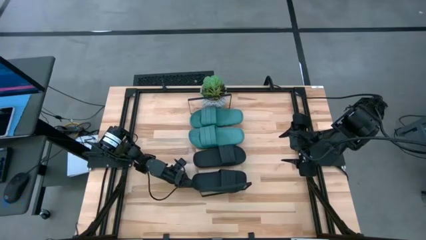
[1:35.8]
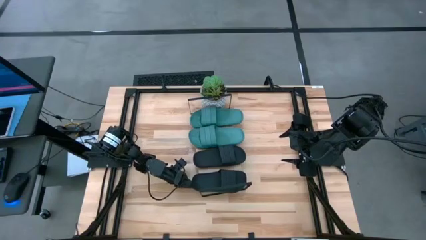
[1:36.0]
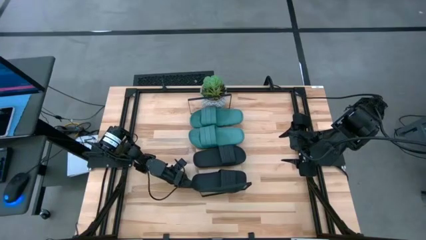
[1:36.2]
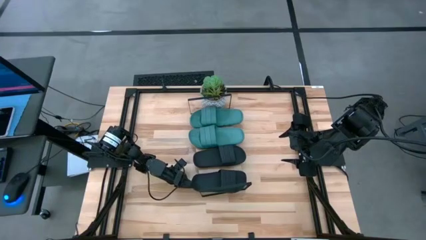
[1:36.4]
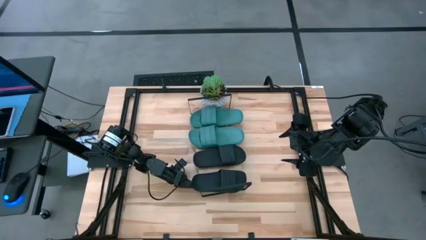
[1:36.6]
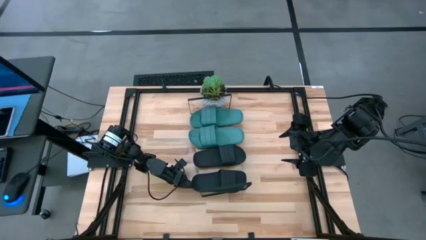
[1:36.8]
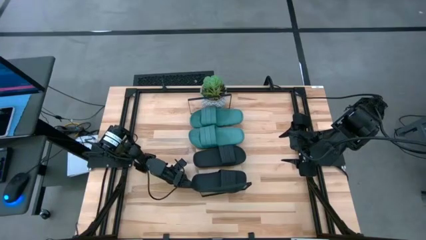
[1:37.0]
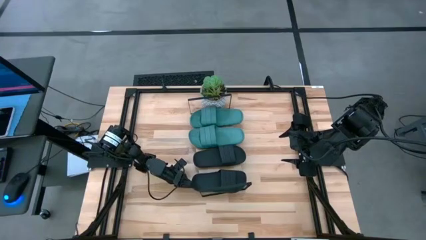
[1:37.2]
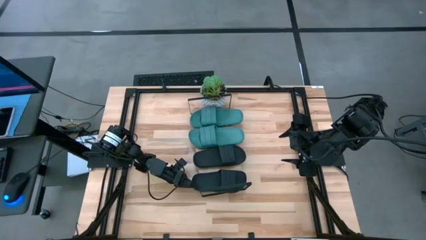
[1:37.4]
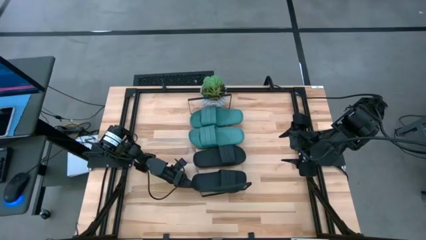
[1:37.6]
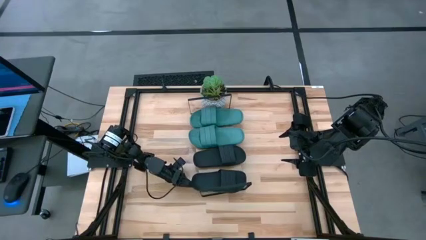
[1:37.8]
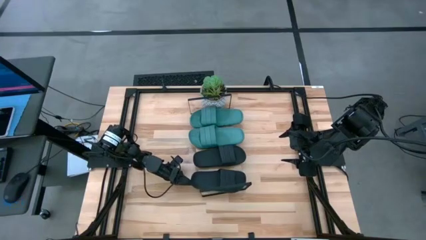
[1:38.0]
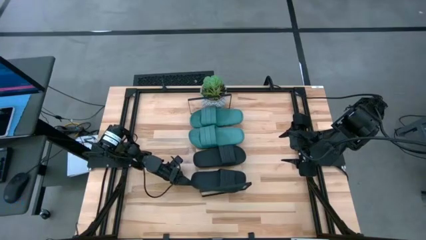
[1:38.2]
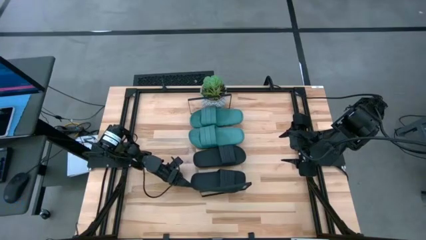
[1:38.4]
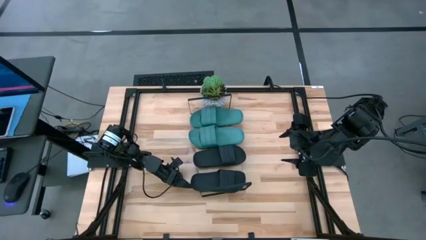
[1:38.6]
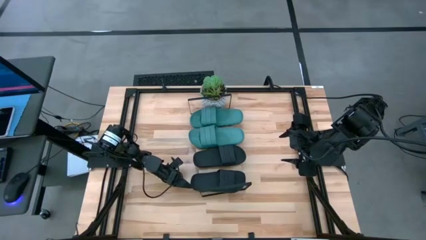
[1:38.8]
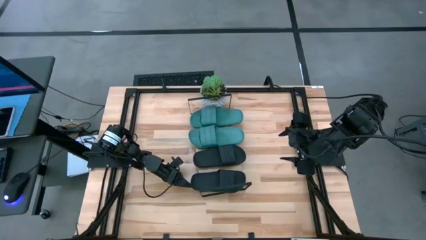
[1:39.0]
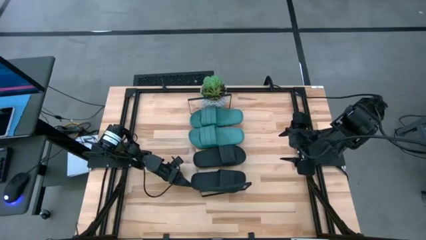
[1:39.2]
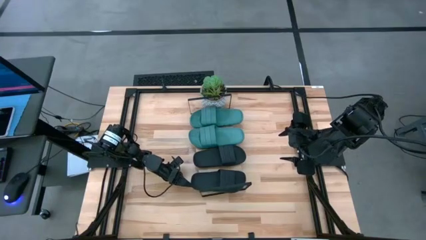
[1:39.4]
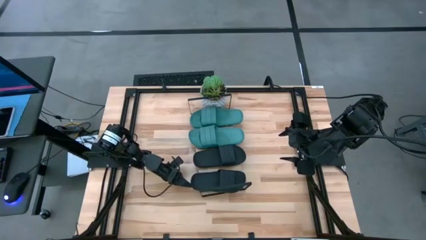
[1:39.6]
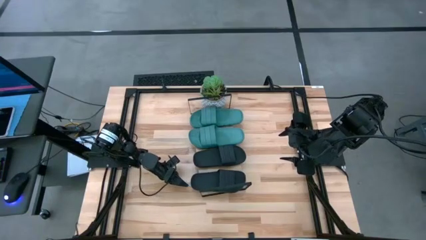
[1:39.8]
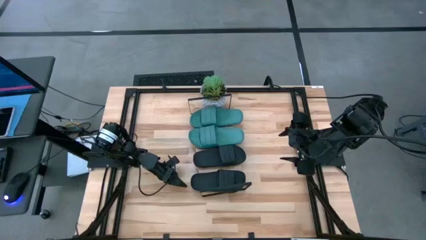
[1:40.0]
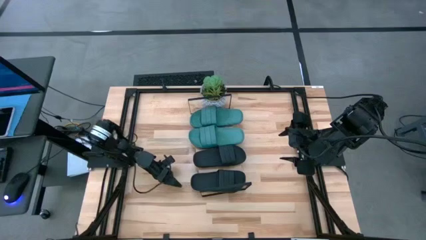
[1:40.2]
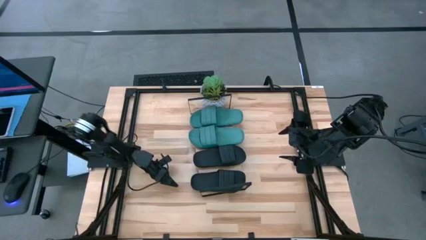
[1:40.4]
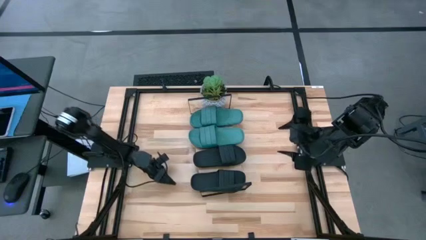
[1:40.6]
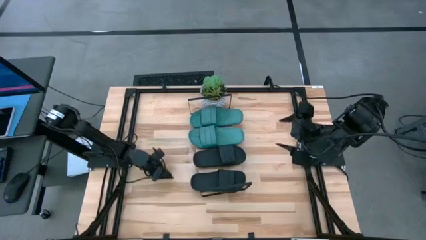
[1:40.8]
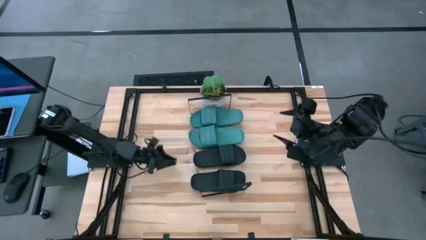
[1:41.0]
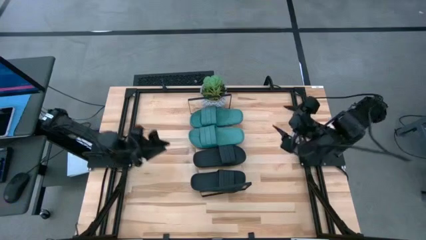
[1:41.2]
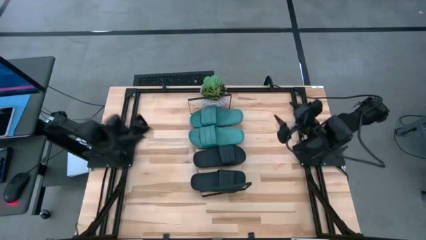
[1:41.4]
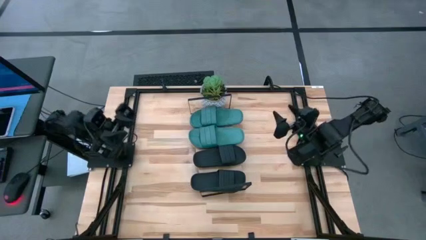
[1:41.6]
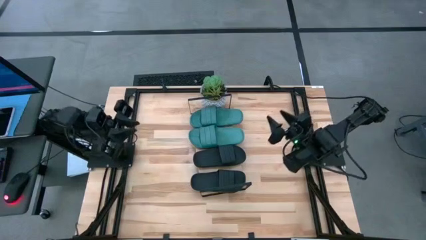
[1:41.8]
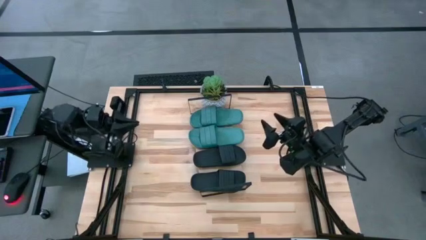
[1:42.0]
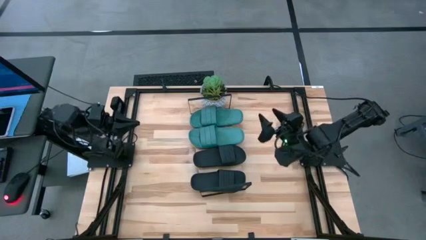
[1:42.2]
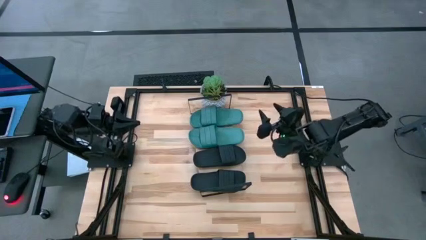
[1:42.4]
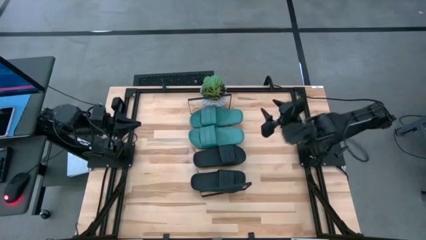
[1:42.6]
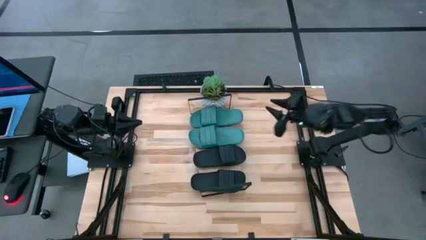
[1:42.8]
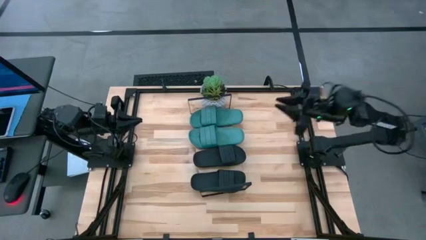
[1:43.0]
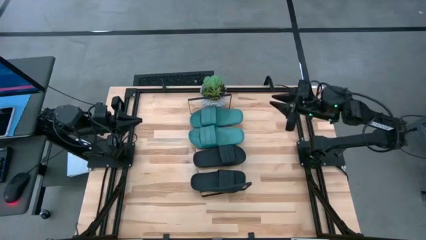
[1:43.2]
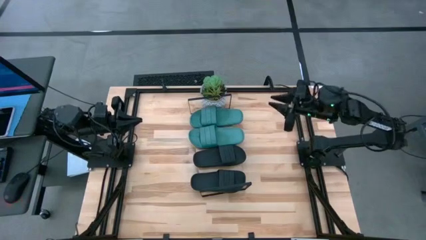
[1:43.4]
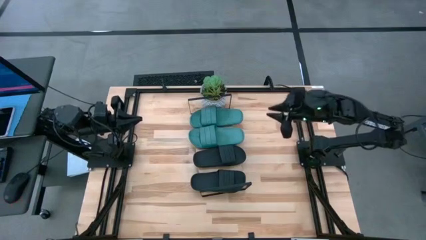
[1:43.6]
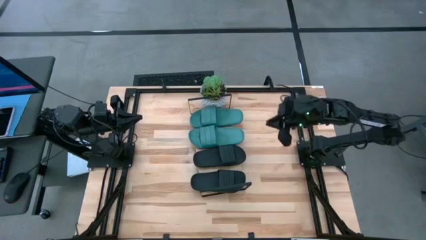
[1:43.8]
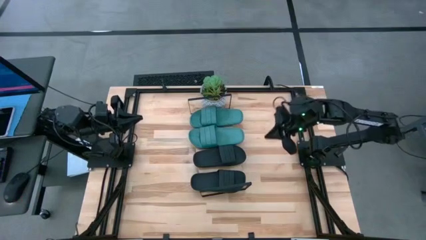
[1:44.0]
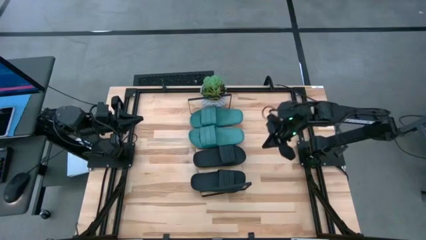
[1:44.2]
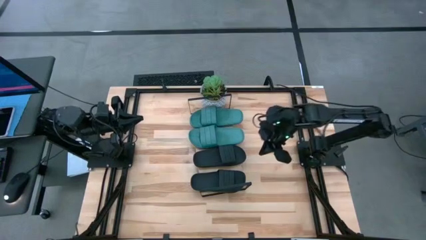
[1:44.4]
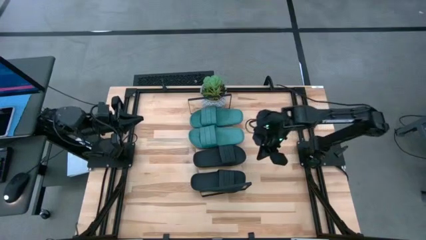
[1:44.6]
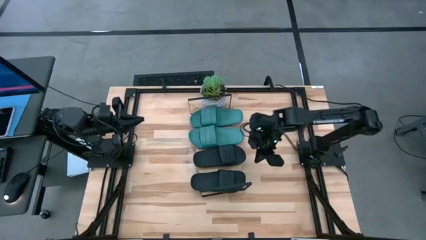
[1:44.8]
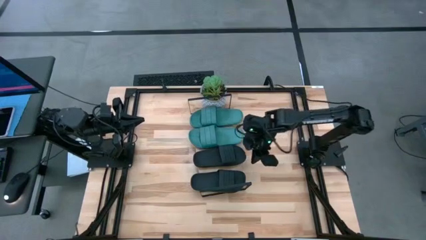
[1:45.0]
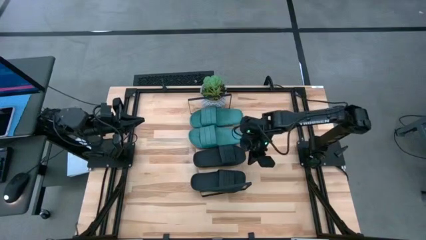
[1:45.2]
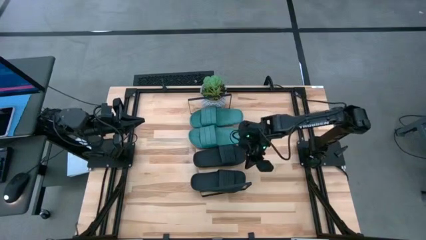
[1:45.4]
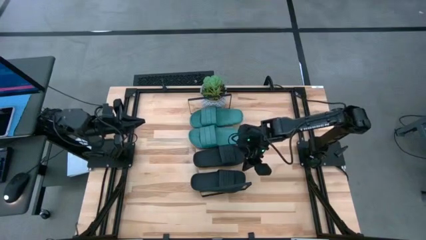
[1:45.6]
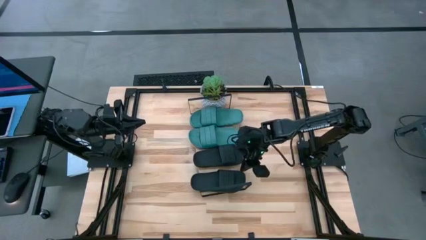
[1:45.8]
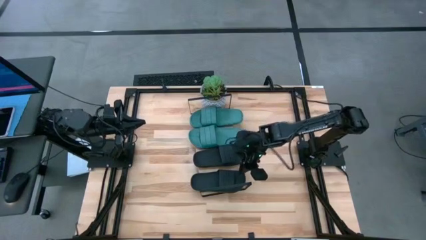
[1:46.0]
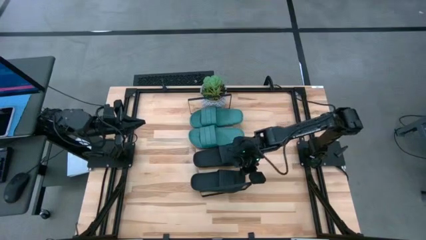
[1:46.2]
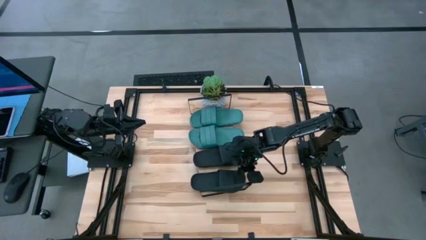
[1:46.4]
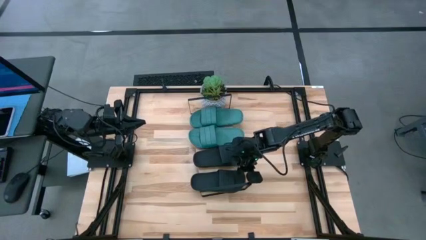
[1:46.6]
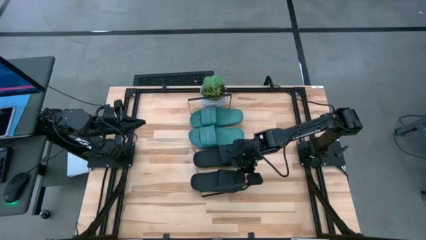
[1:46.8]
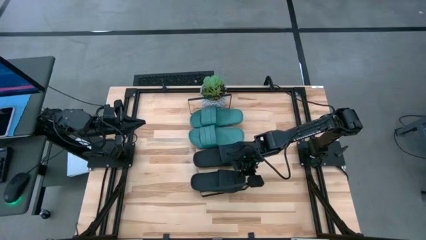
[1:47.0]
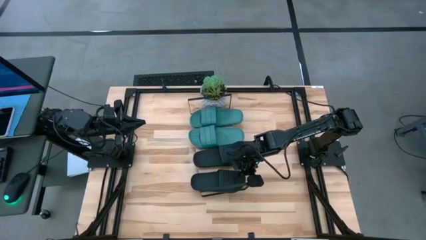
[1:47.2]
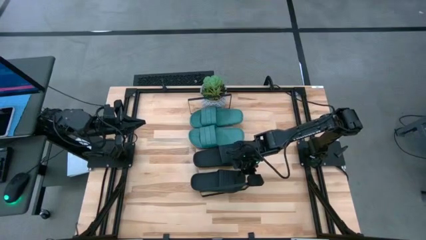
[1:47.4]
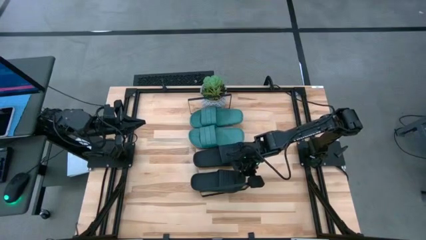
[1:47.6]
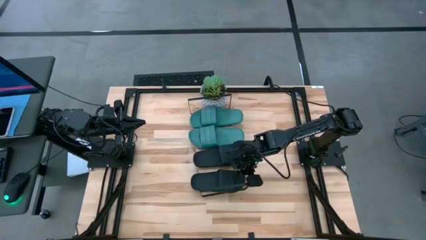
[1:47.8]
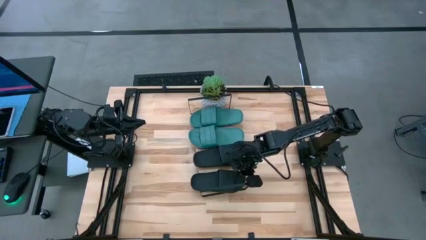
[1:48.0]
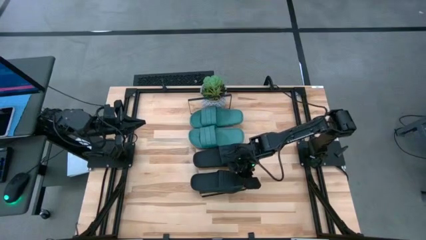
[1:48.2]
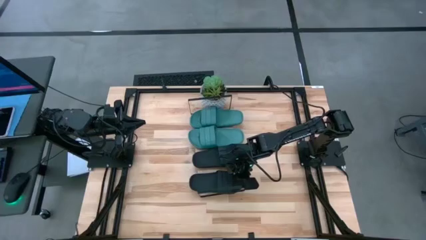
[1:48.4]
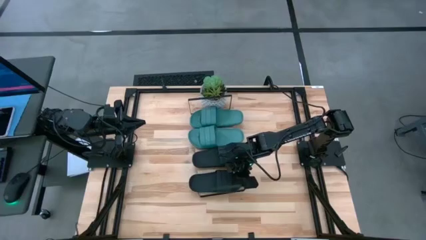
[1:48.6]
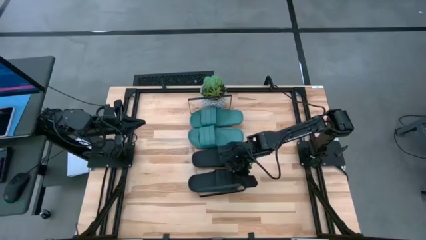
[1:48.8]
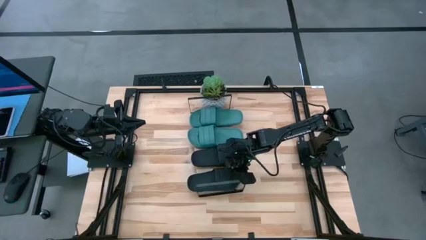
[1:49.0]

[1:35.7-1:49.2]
Task: Pick and place slides into the shelf
Put the black slides on the shelf

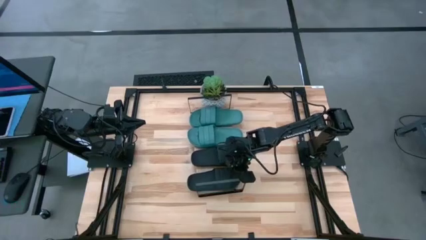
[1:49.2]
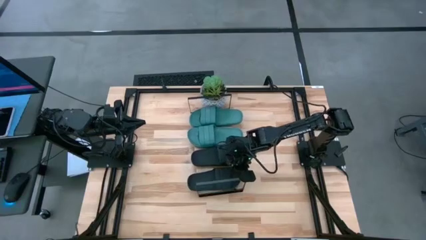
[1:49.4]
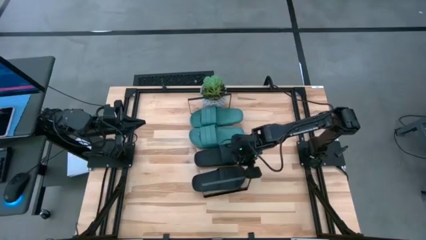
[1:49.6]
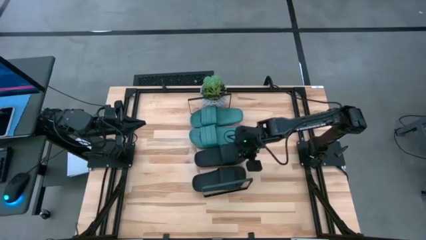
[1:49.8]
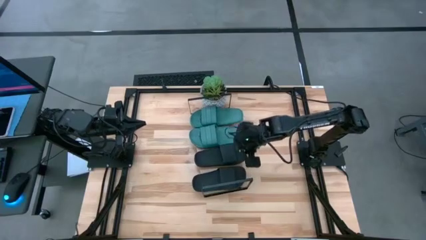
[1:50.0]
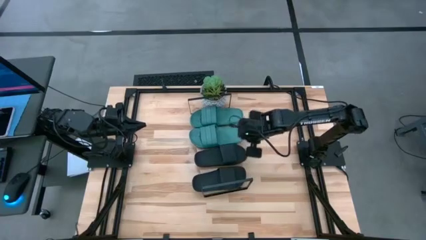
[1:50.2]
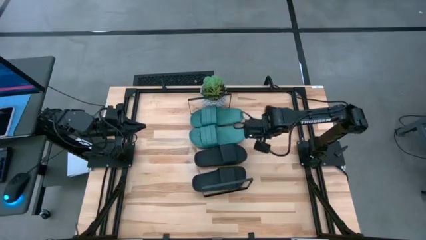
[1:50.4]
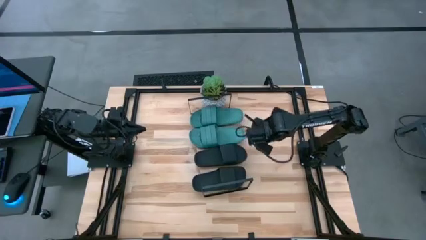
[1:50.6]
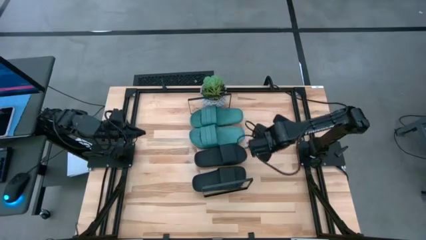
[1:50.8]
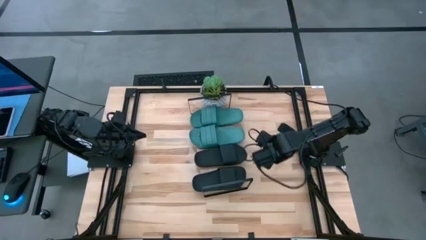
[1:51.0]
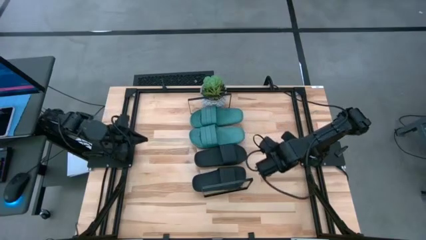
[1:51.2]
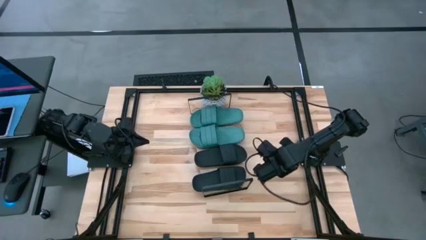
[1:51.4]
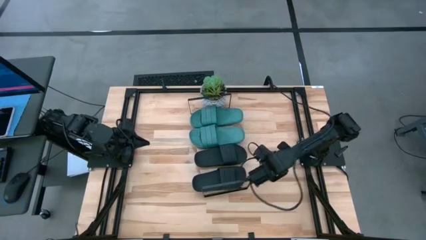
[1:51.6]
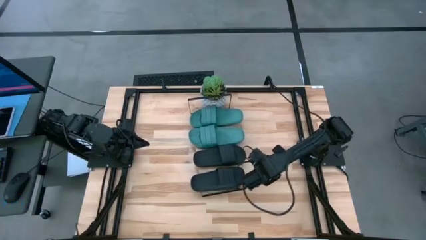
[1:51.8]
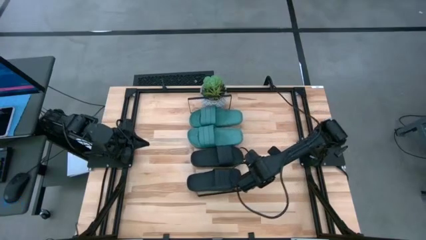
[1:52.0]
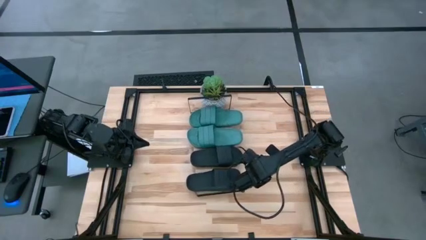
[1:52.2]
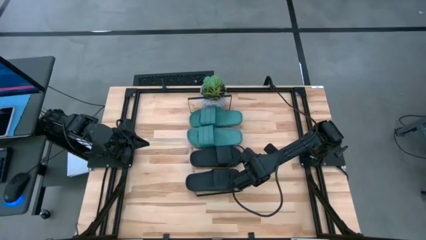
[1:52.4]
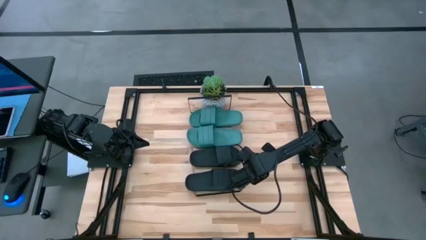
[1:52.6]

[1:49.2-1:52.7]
Adjust the shelf
